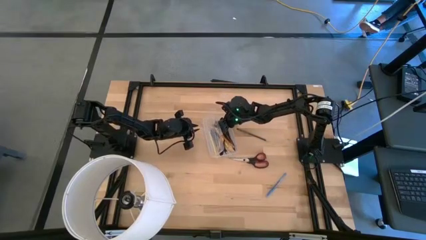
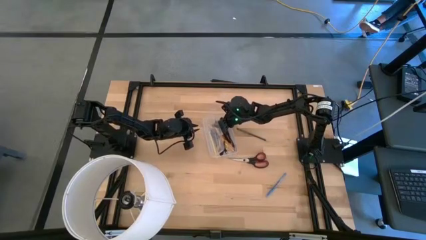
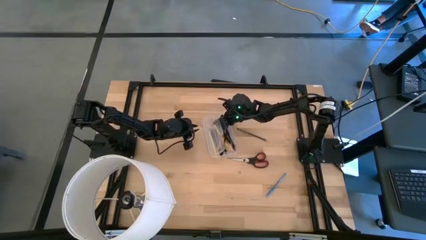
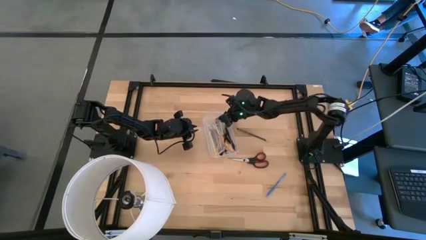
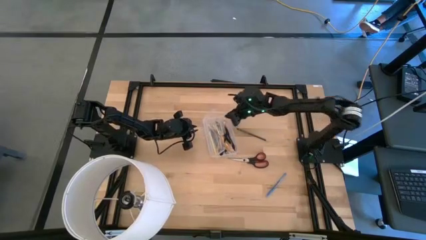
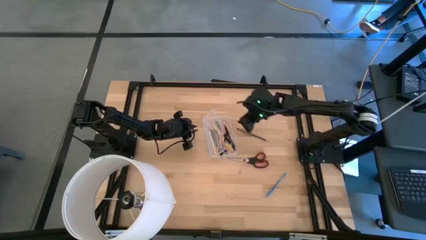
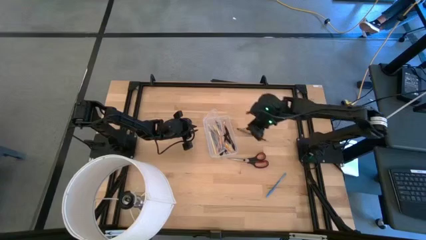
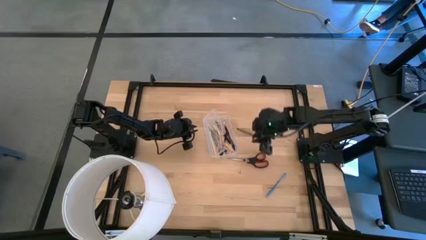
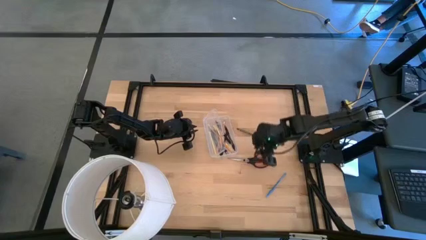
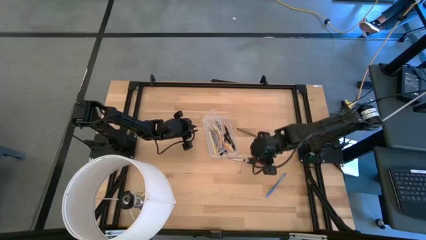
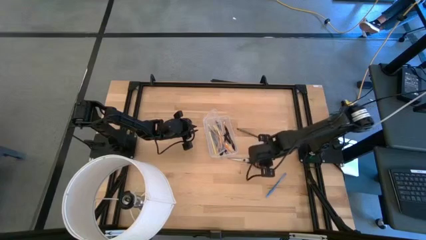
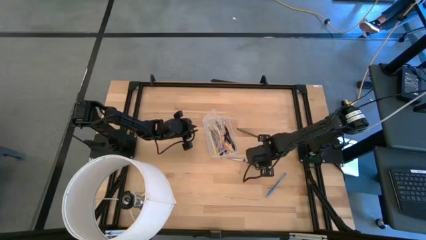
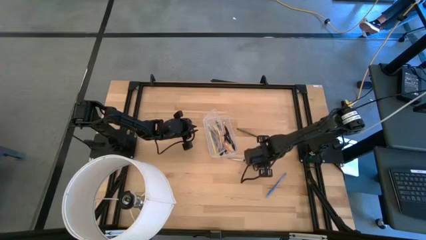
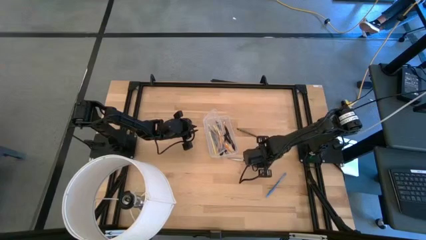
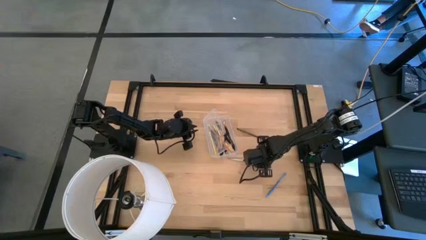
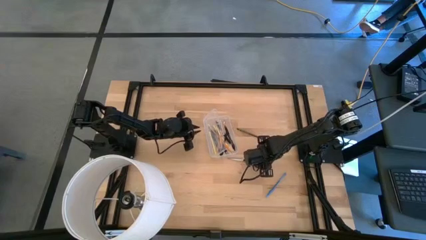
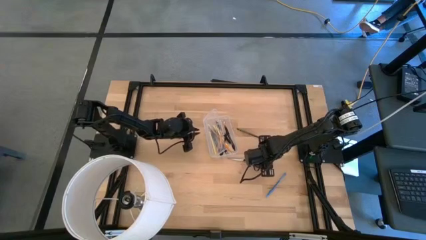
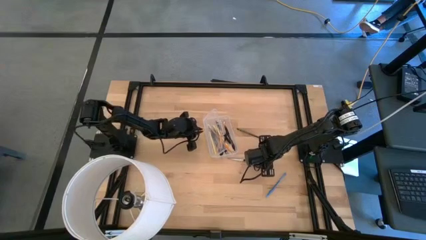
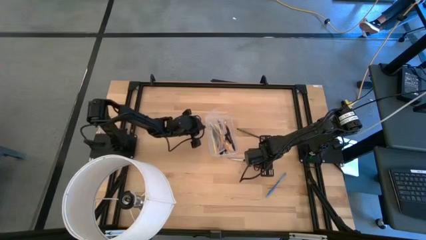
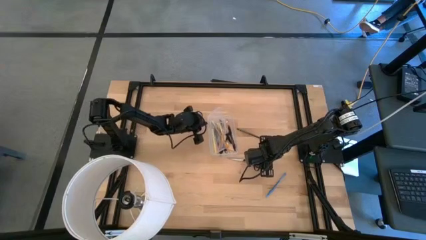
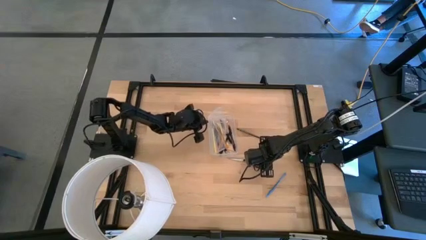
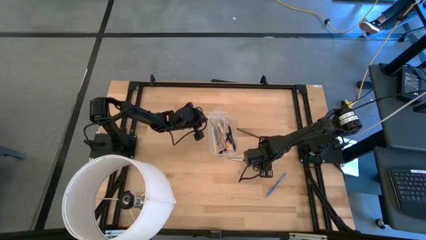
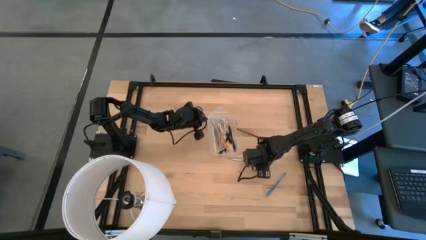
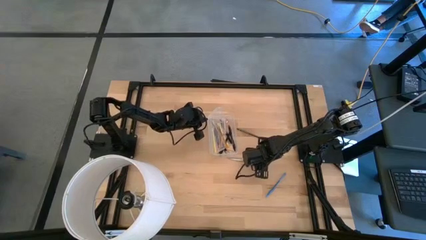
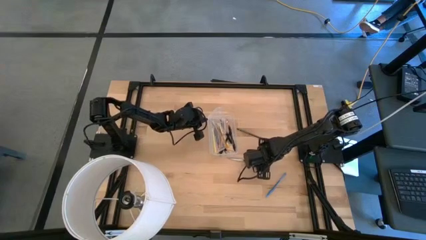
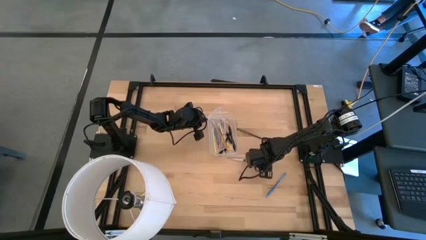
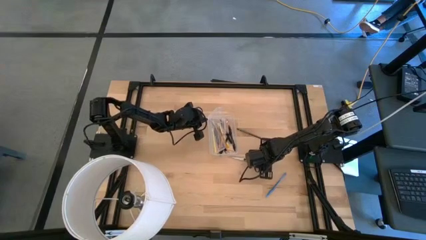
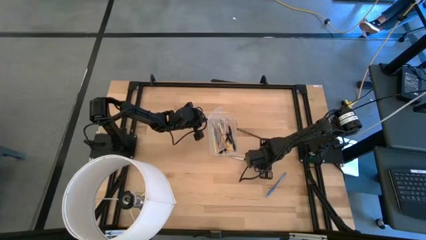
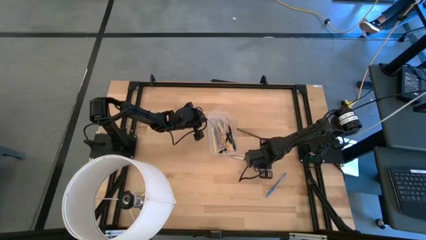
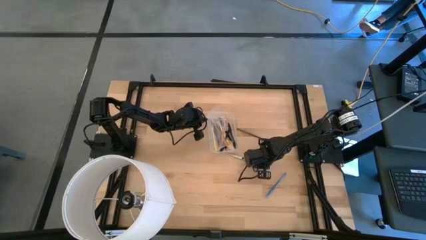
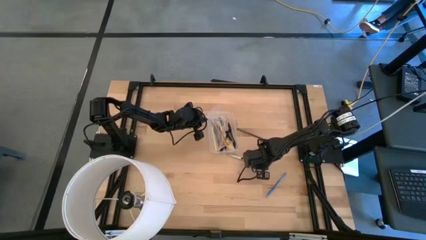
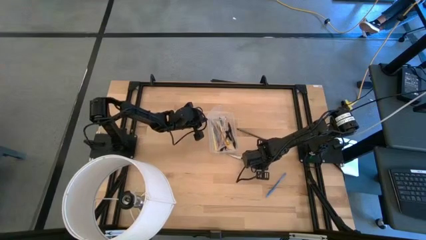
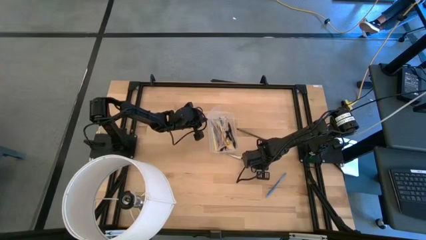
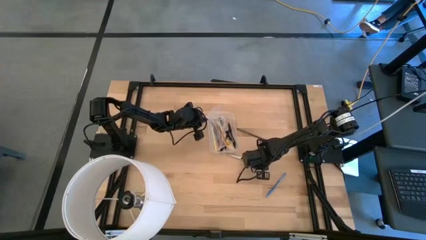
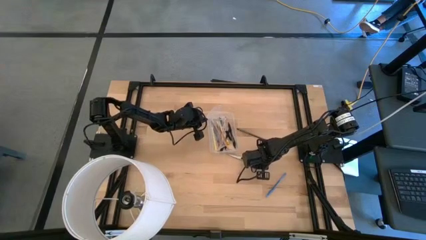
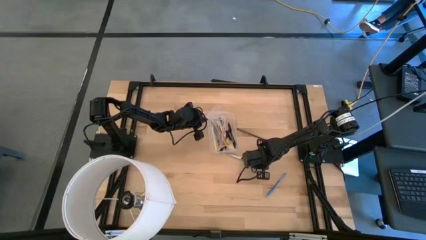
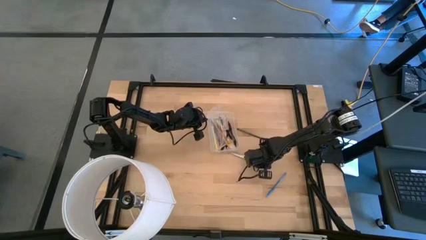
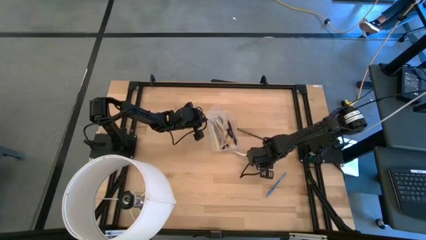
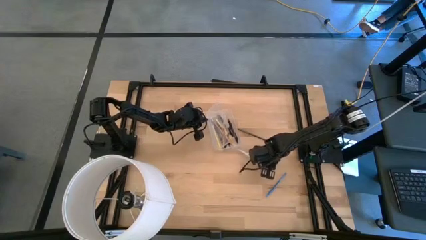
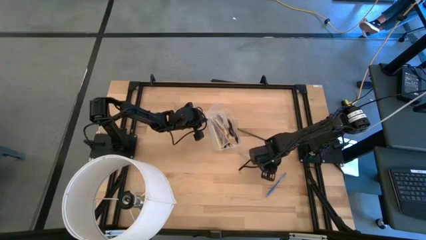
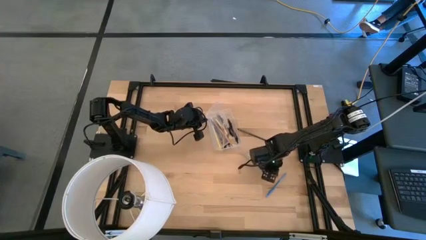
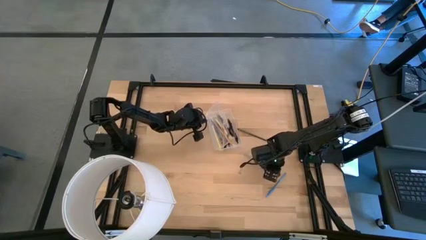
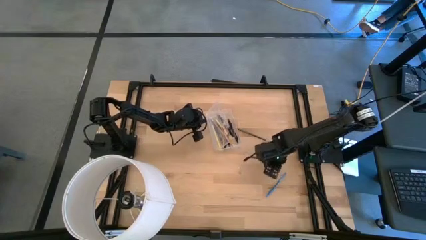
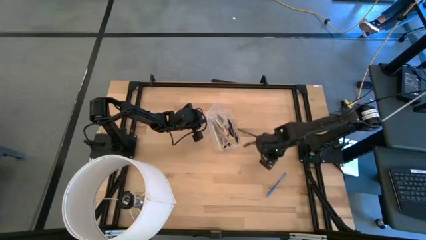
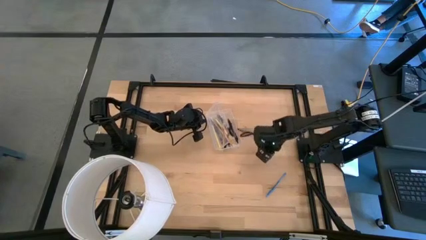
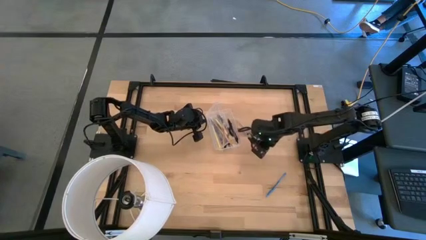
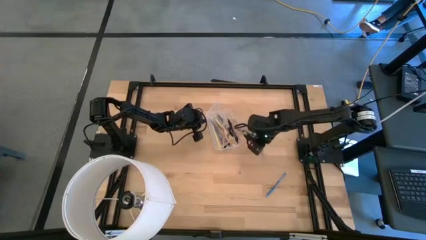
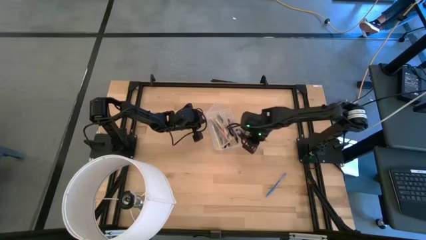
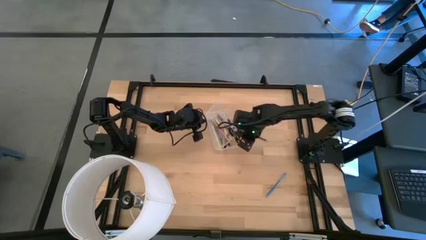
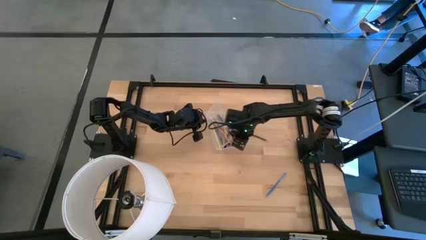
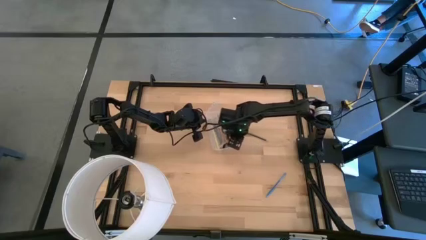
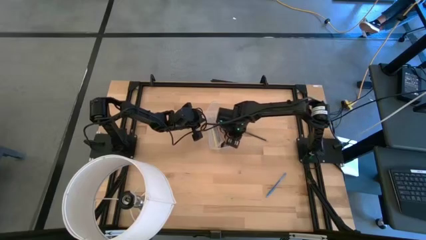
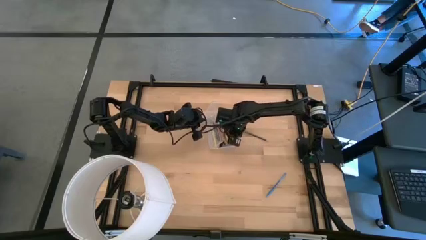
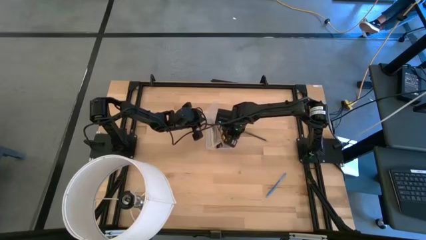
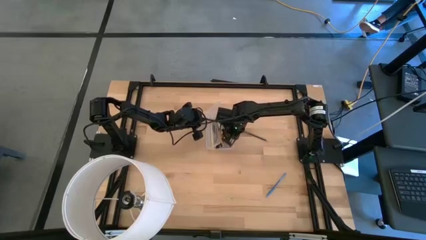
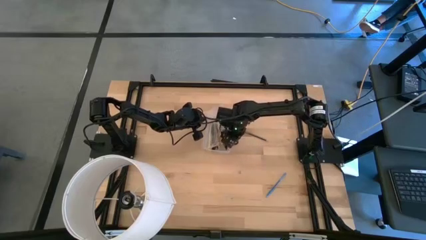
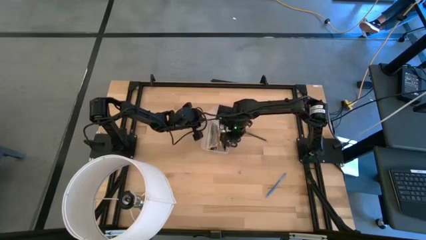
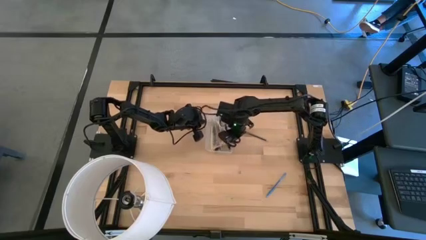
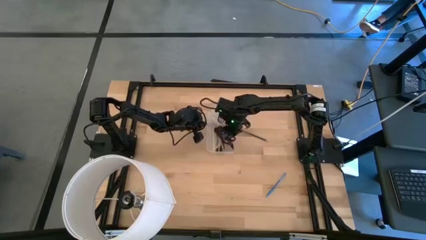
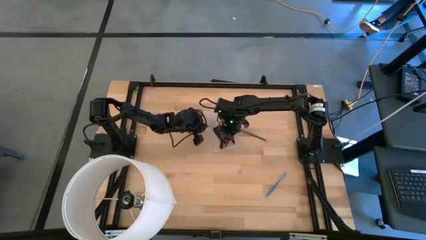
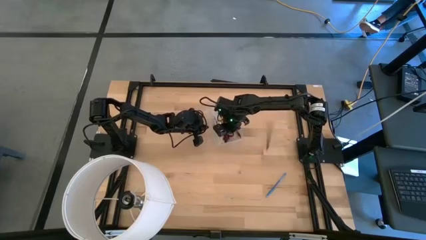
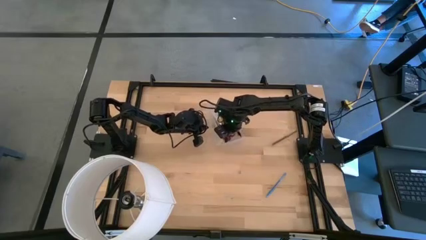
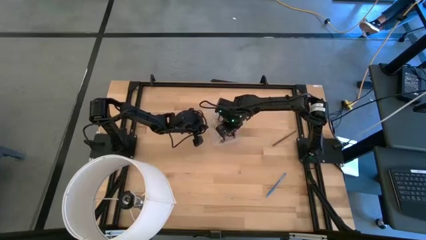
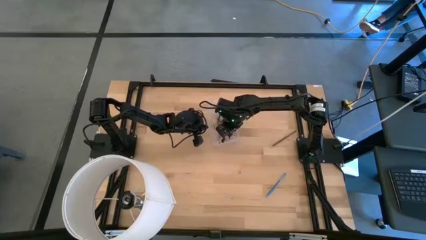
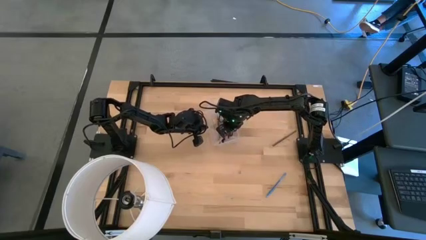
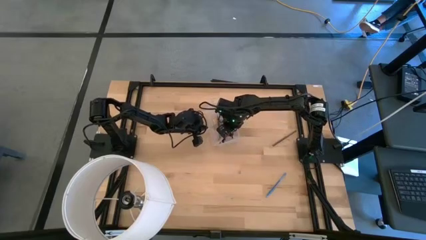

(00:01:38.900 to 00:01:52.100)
Task: Pick & place school supplies into a supply box
Put the black scissors into the transparent supply box

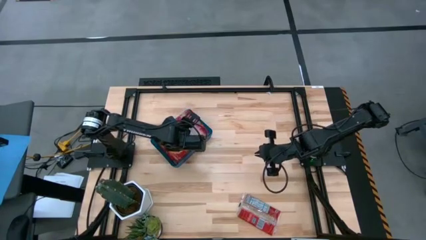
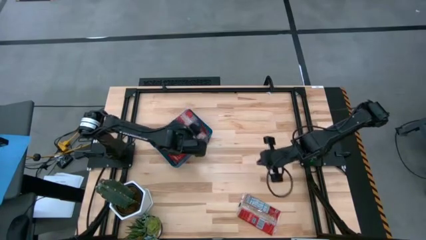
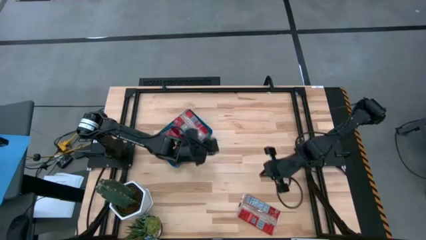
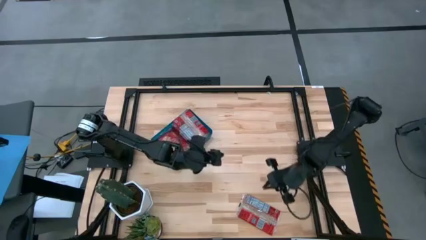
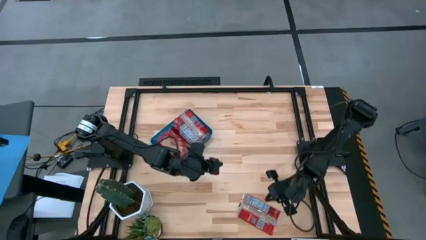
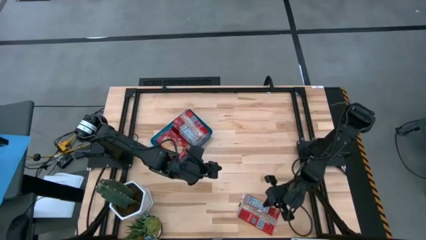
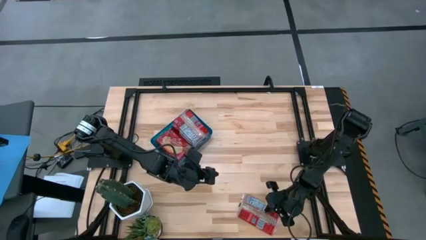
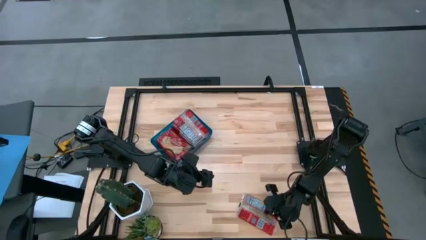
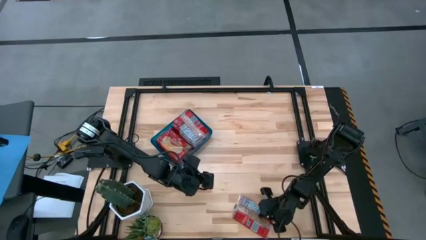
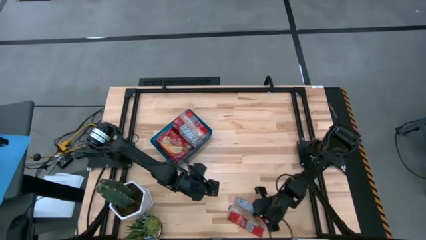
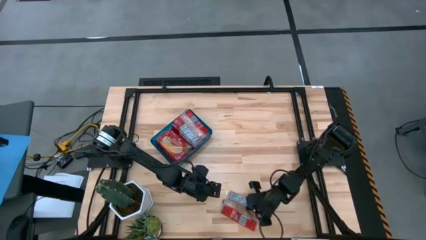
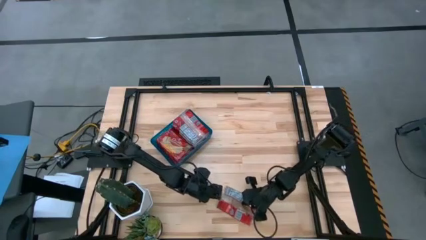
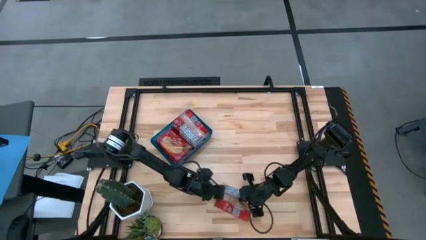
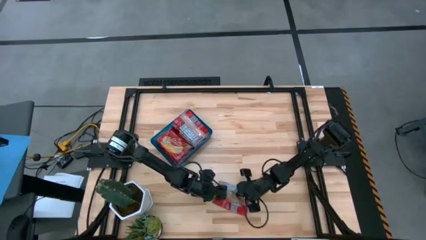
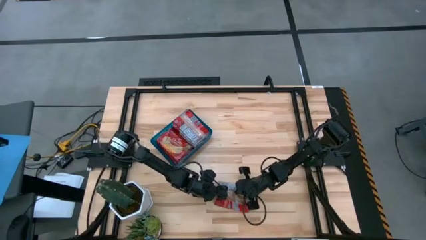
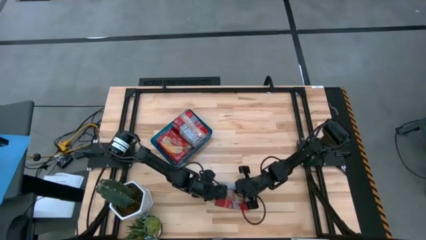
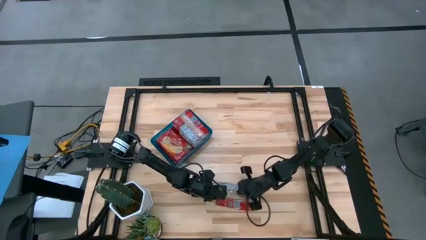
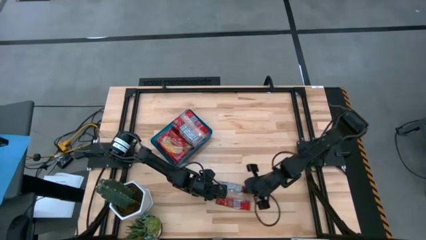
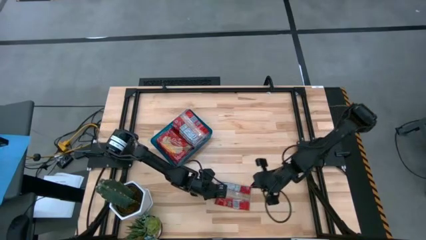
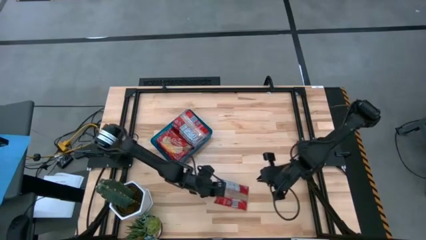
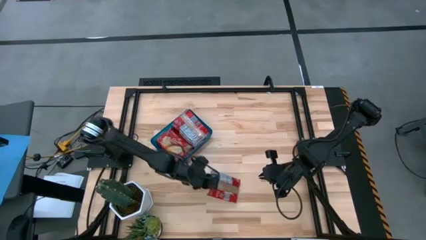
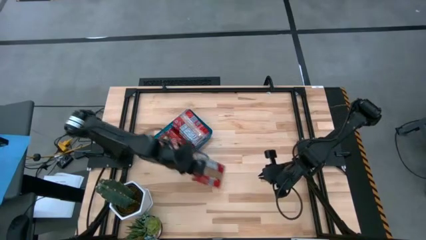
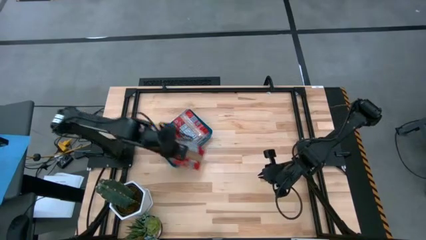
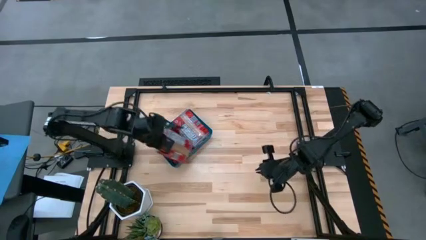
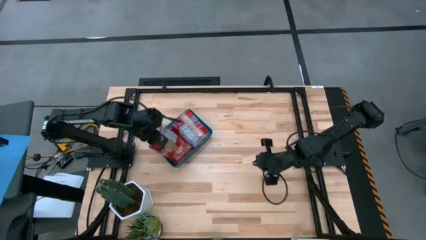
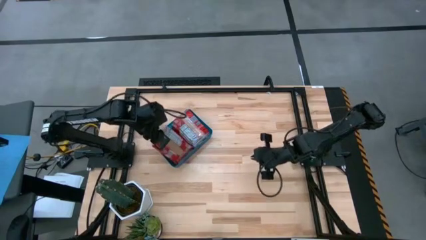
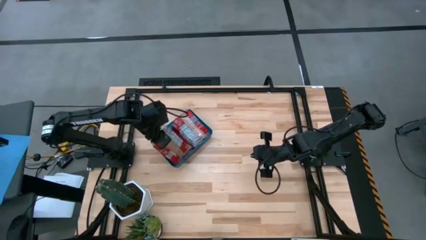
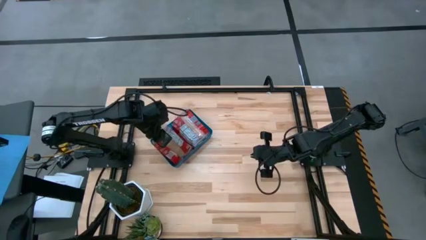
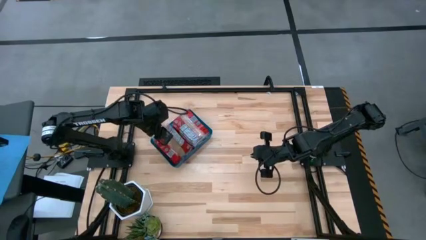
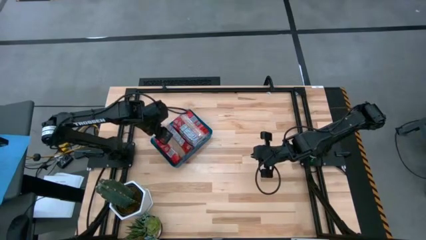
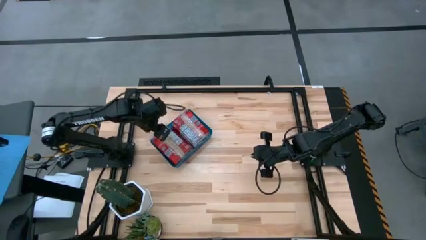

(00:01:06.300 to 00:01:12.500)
Task: Sort popcorn bags into baskets
Put the red popcorn bag into the blue bin
